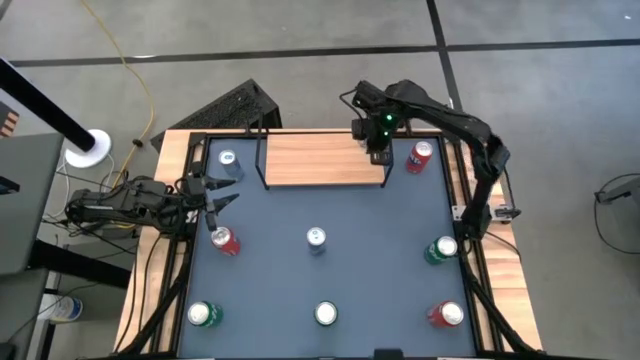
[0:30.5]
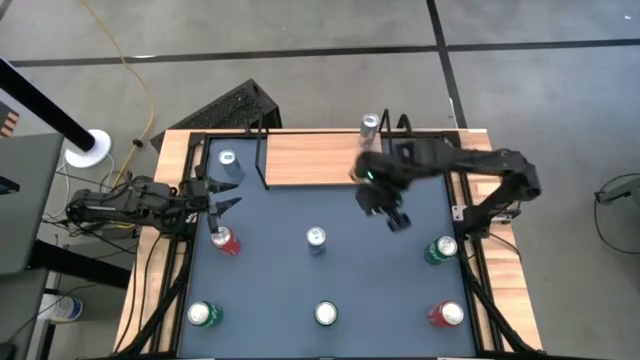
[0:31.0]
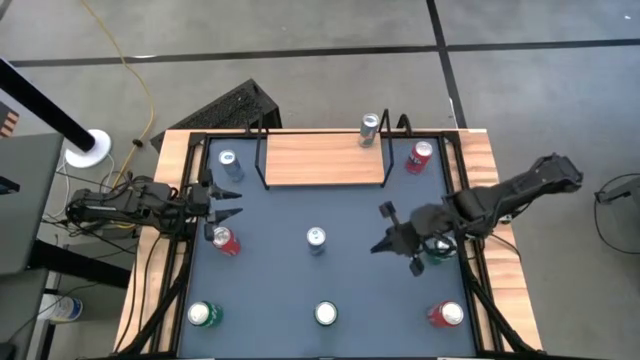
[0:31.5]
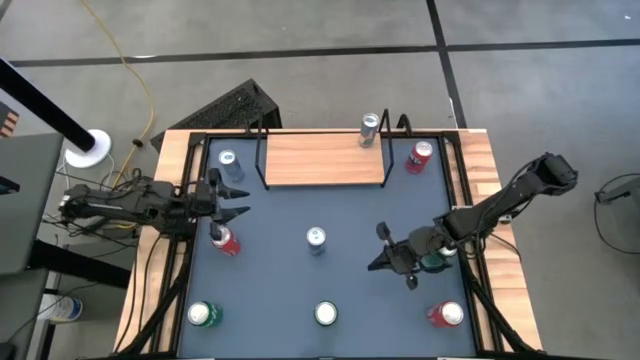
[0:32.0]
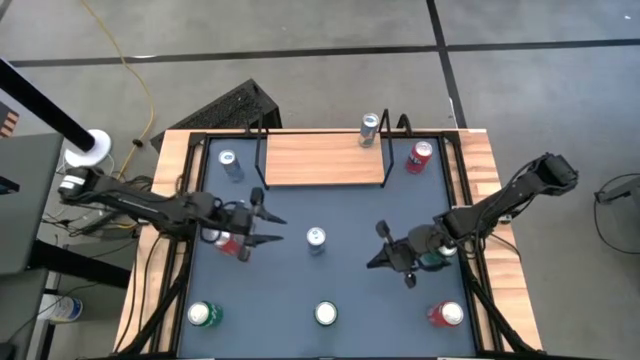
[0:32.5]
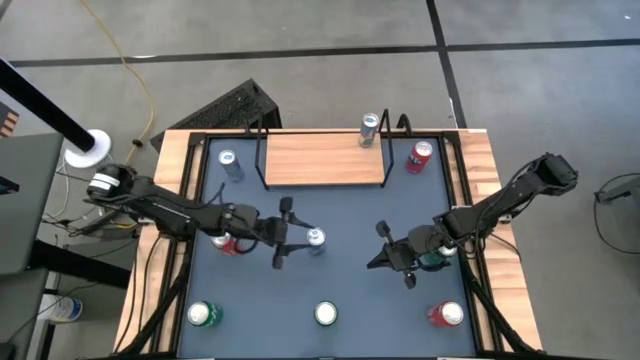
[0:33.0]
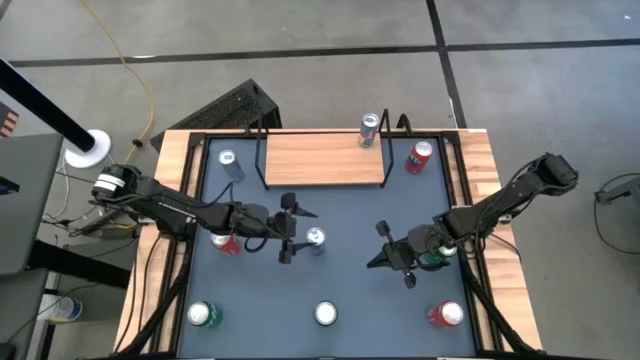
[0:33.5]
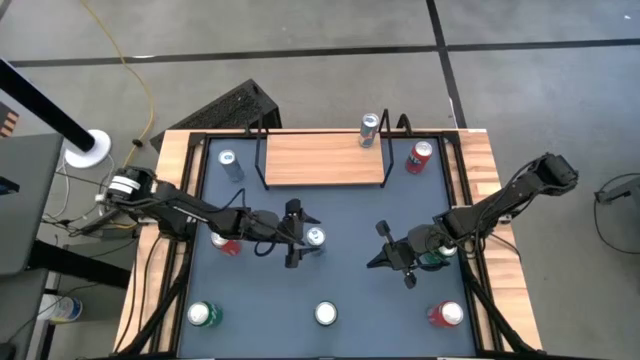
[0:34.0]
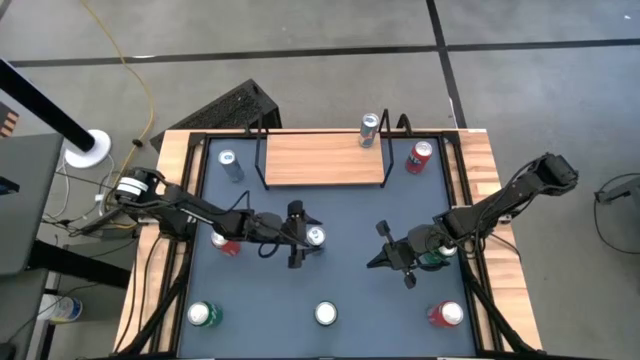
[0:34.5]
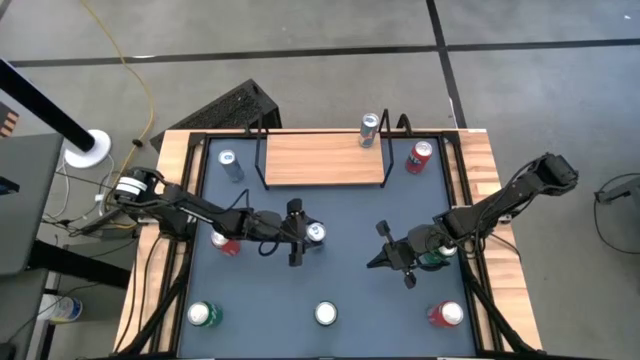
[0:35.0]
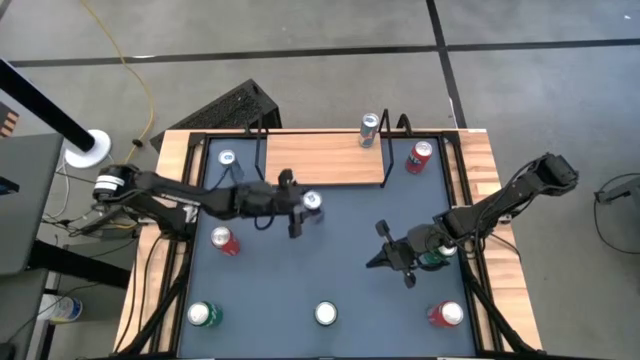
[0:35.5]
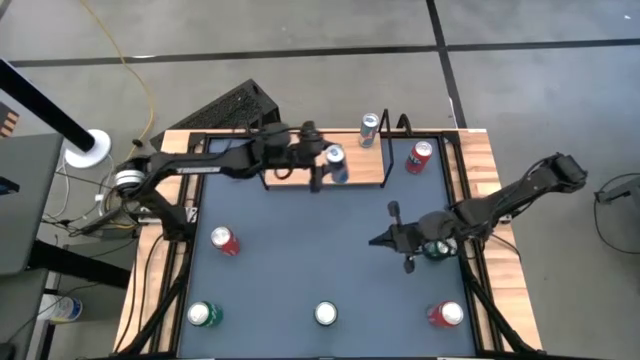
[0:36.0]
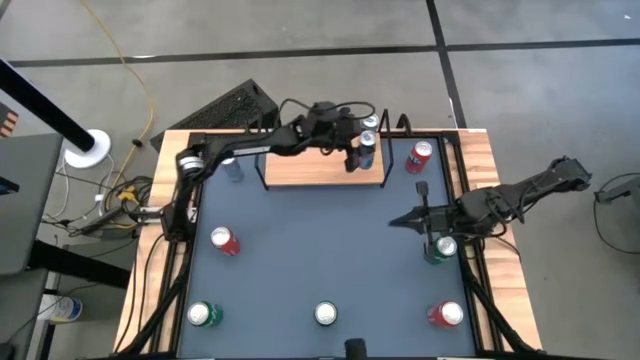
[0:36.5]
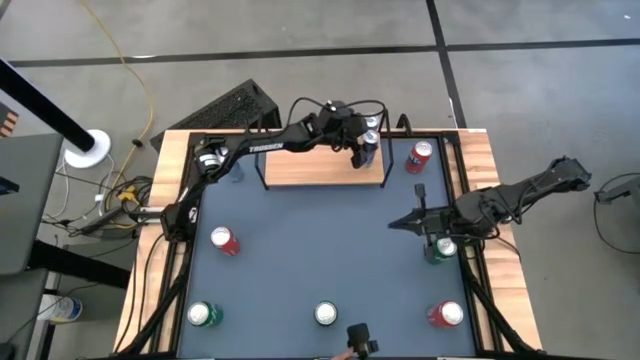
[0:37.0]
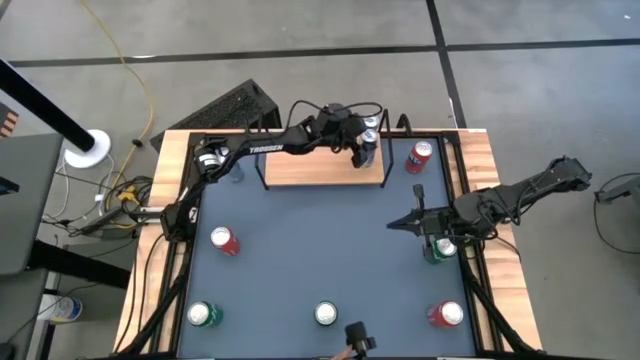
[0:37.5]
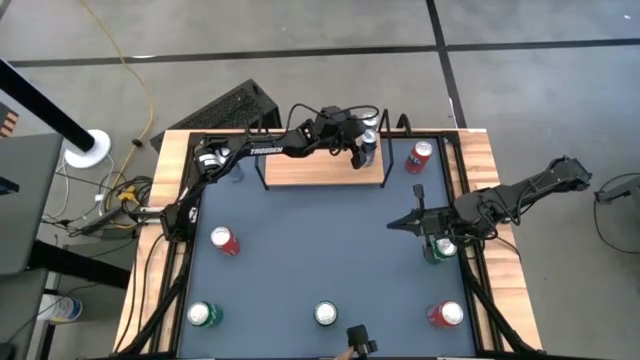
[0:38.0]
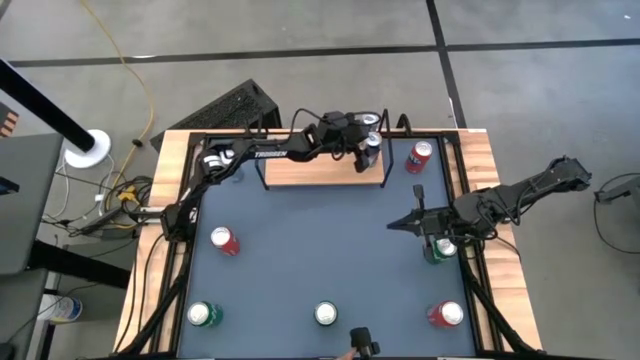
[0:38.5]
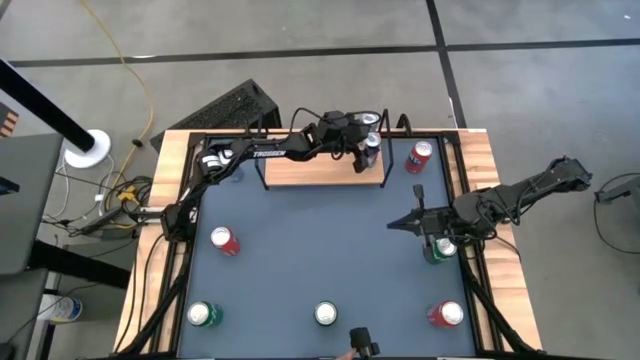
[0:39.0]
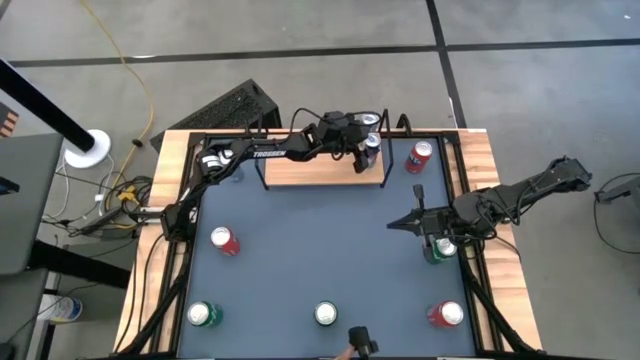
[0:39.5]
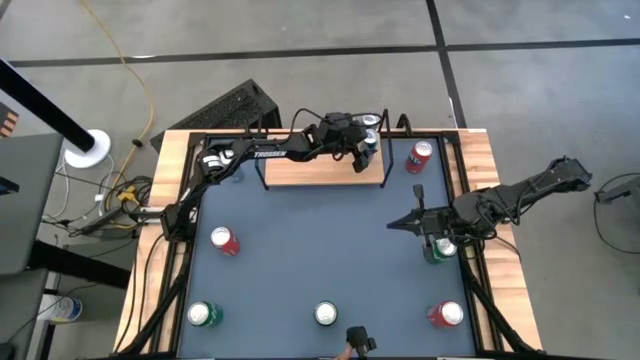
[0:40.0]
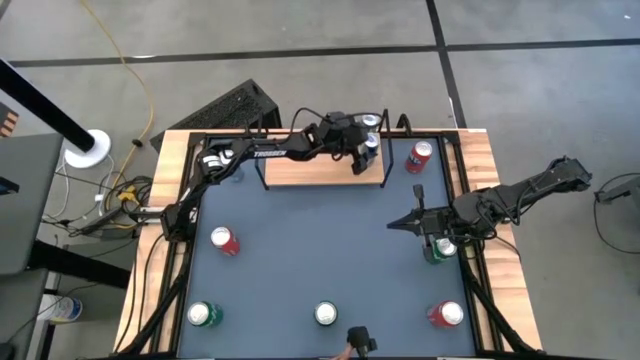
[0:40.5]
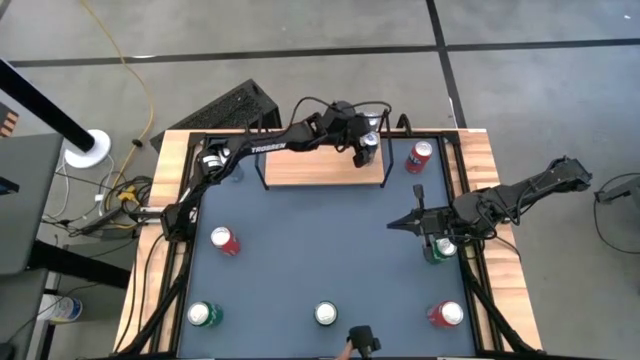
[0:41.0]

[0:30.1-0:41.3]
Task: Place canned beverage on shelf
Put the bottom blue soda can on the shelf aligned with the other blue soda can

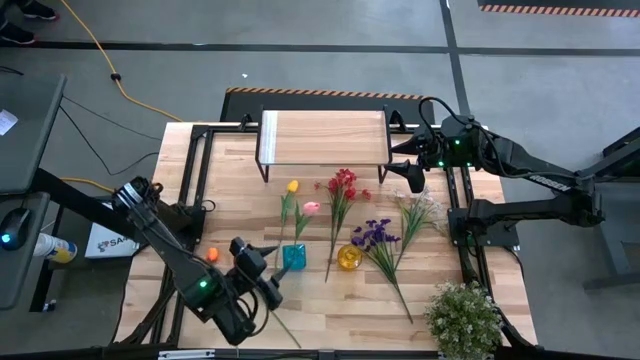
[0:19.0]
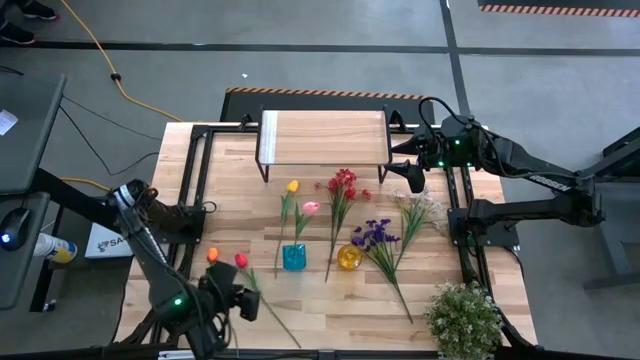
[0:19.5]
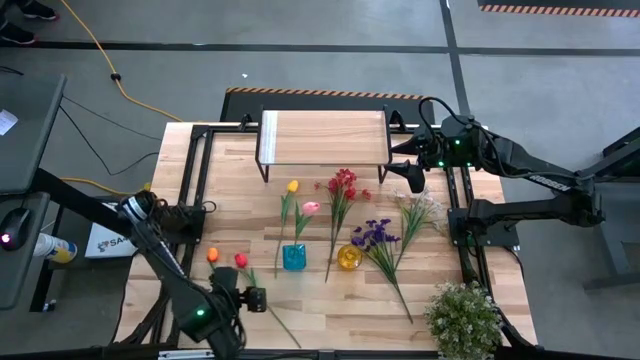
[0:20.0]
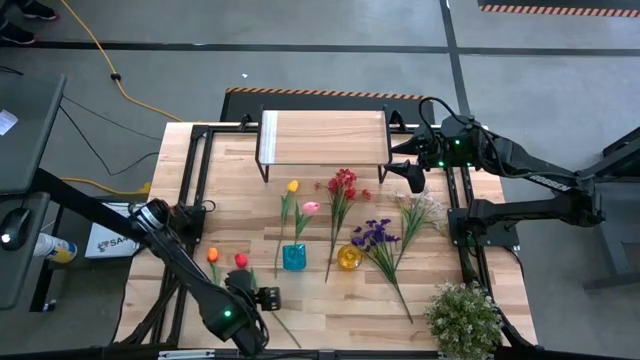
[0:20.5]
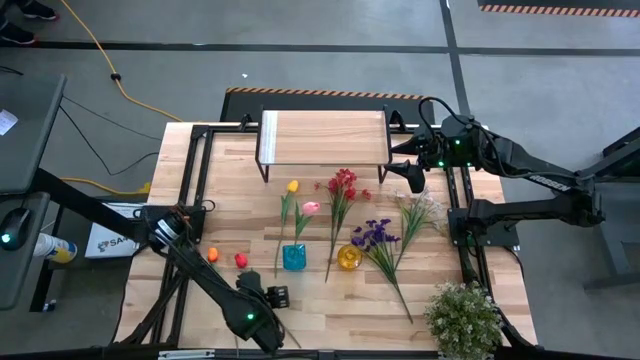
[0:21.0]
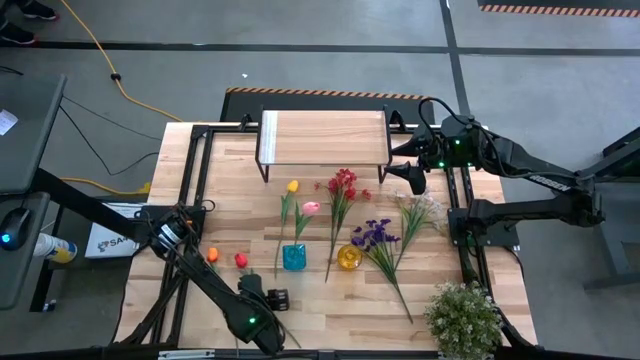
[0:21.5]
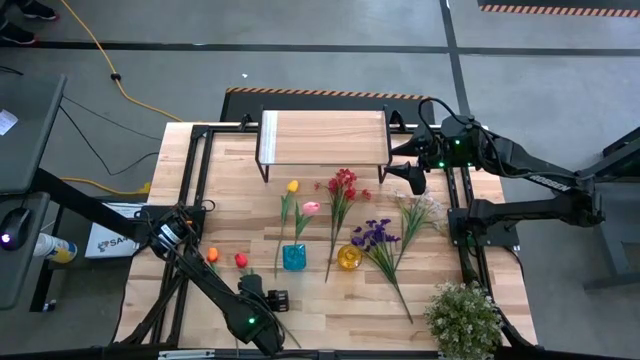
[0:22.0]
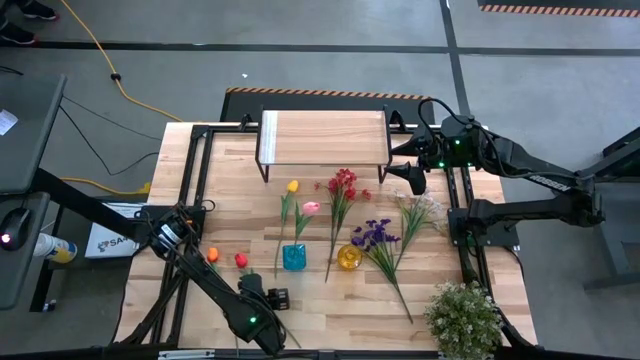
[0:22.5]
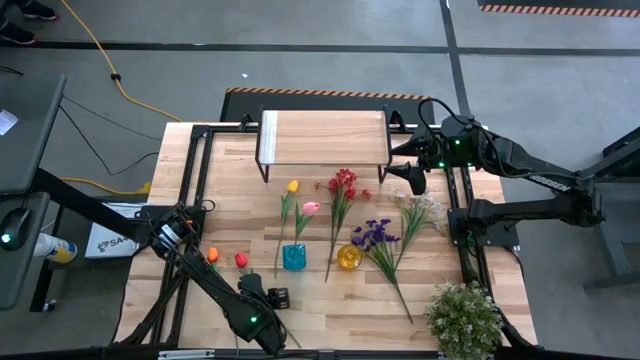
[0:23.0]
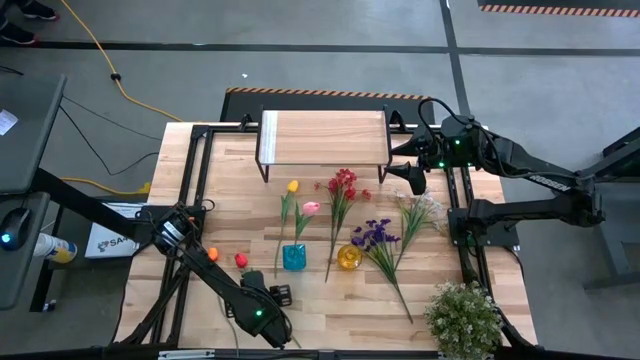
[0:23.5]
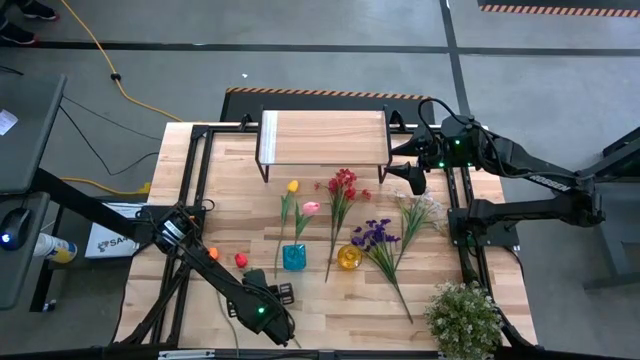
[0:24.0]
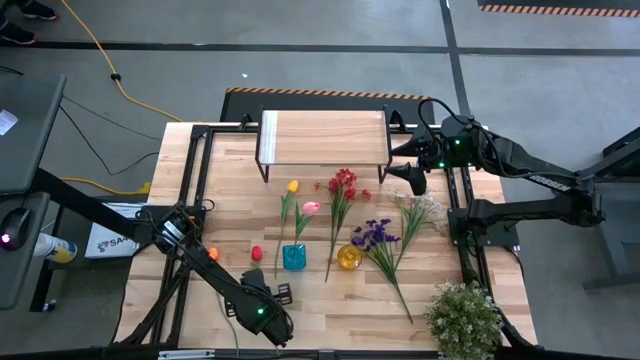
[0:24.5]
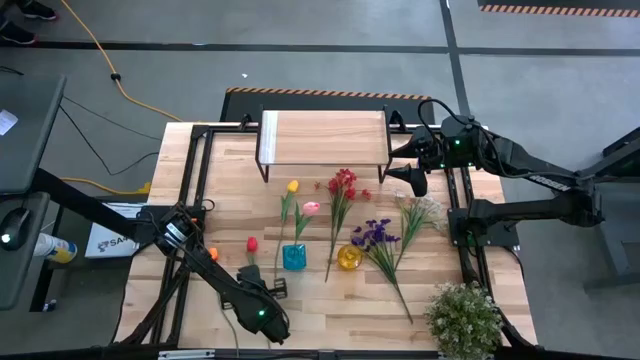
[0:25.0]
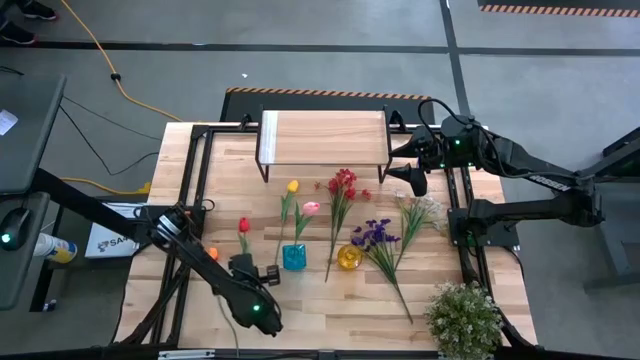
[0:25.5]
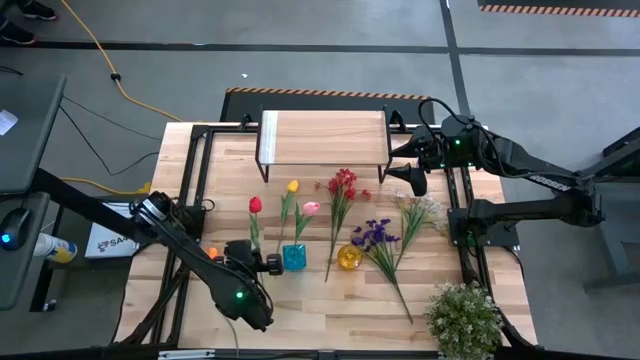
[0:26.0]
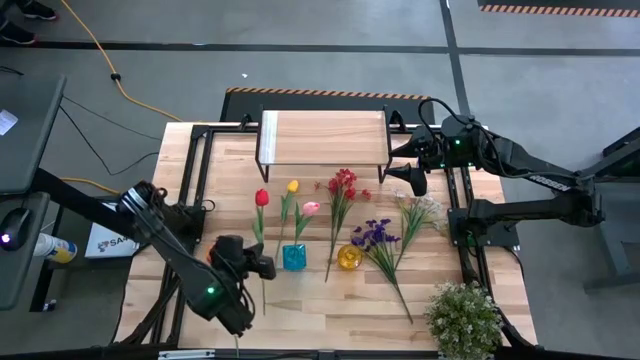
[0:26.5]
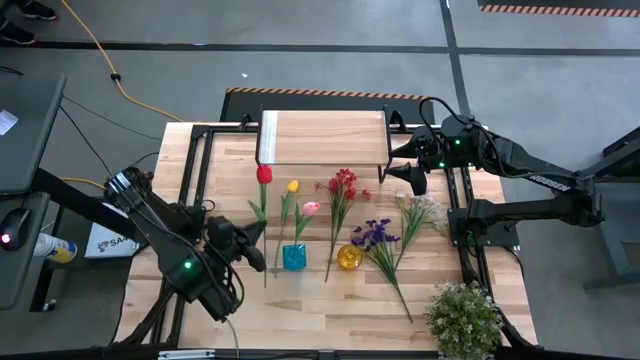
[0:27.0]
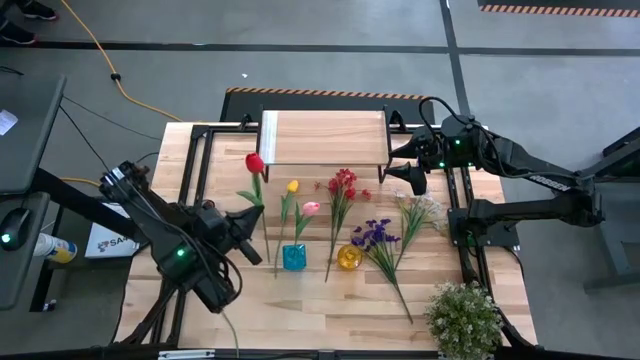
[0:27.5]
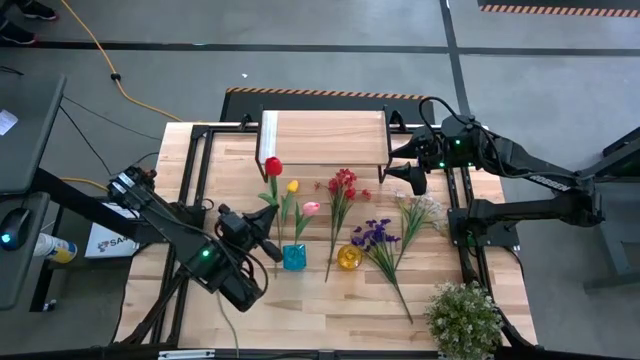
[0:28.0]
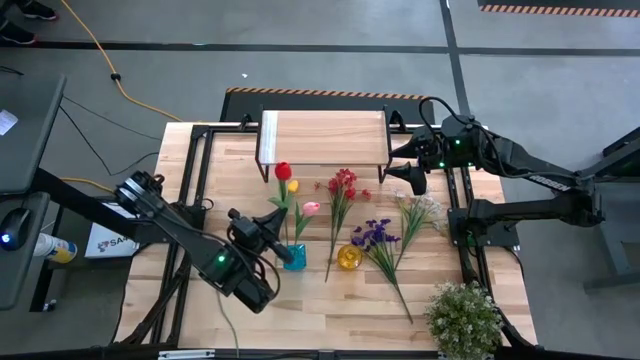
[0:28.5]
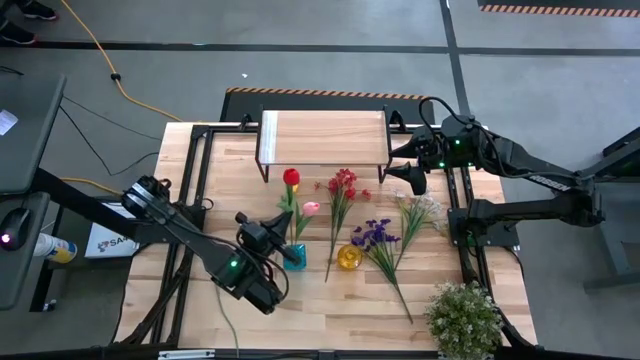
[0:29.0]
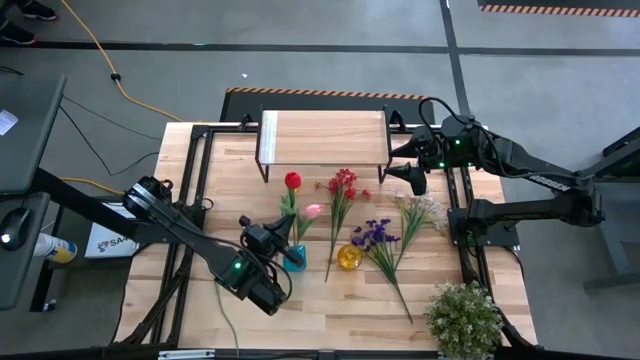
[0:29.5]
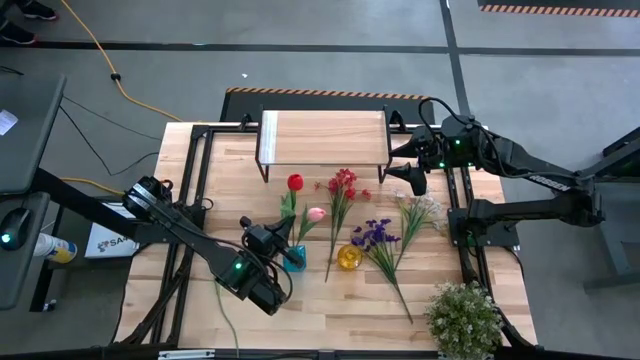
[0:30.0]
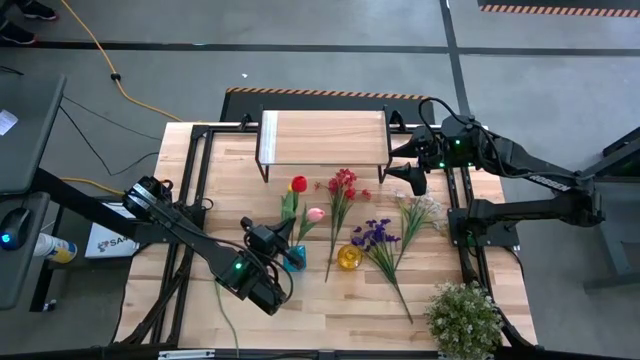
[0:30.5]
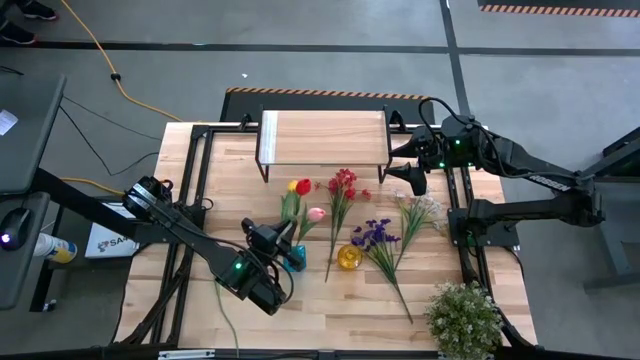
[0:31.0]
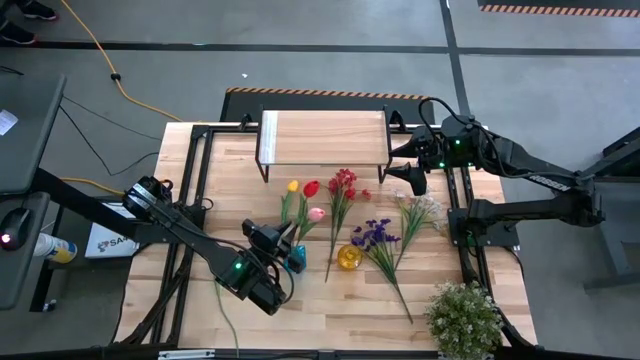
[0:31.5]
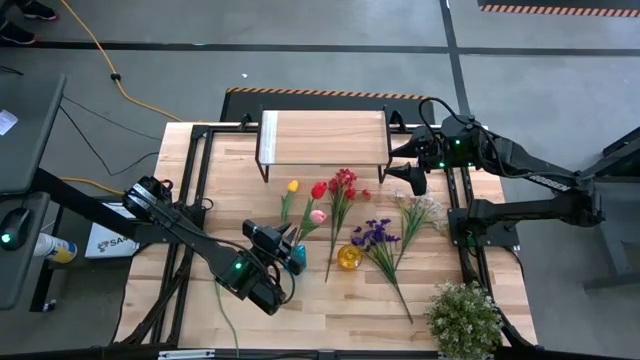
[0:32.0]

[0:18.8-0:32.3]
Task: Pick and place flowers into a vace then onto a shelf
Put the red tulip into the blue vase
